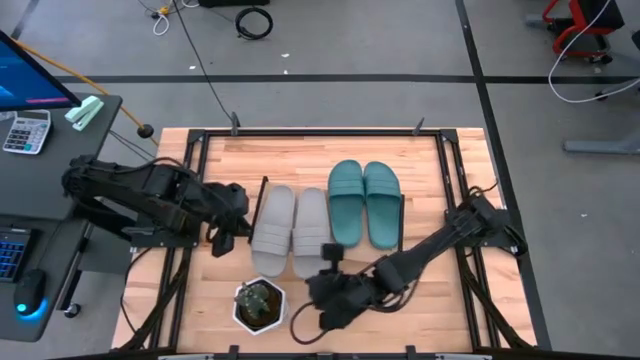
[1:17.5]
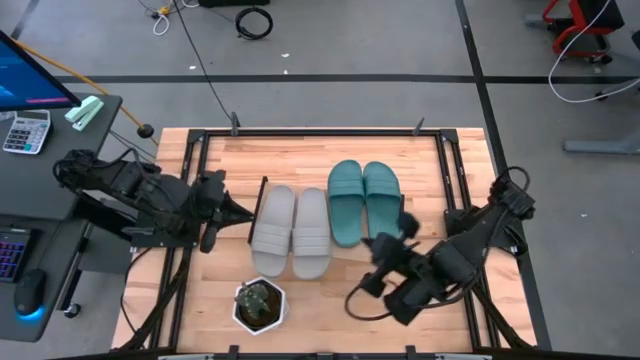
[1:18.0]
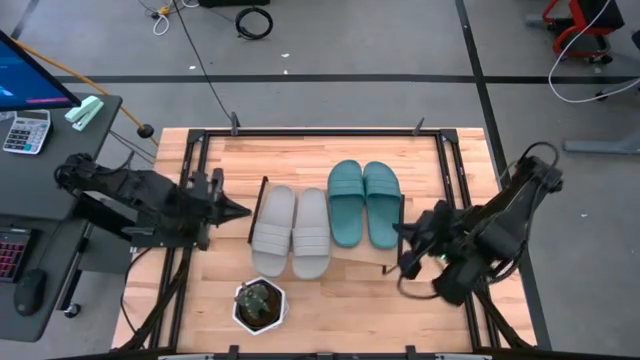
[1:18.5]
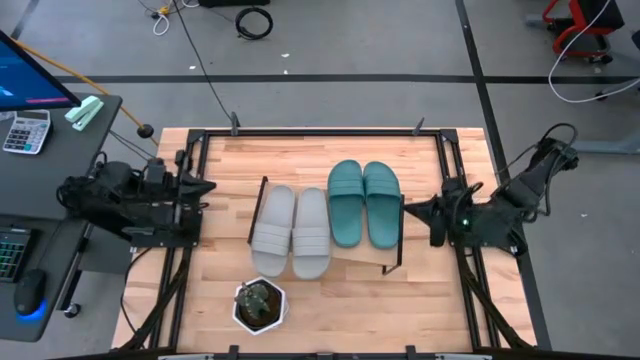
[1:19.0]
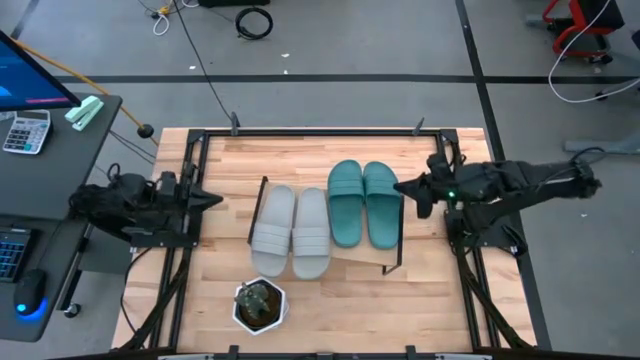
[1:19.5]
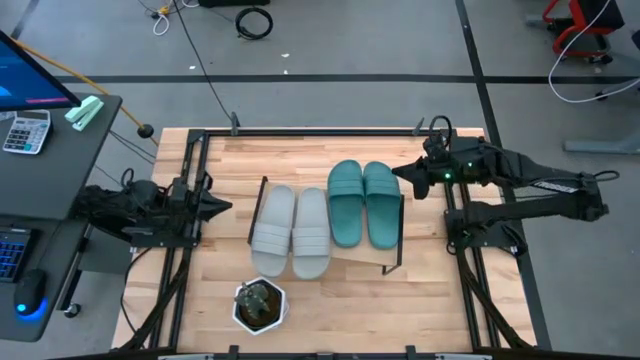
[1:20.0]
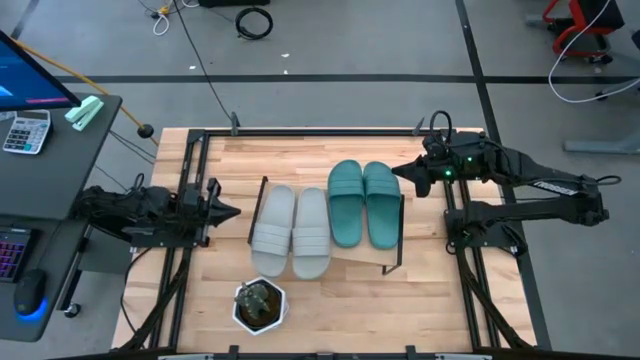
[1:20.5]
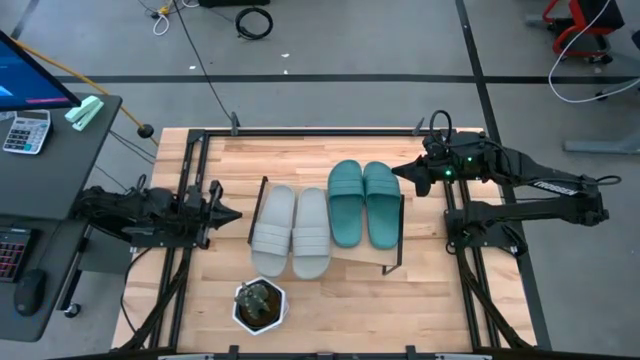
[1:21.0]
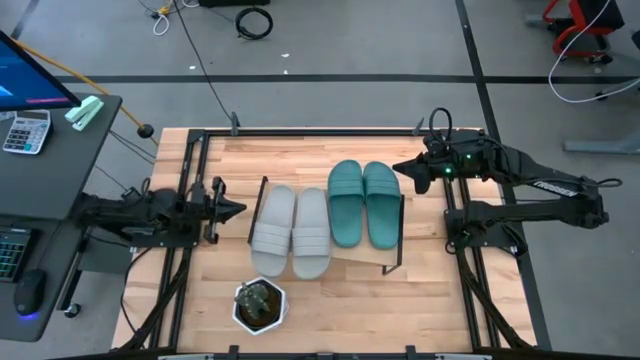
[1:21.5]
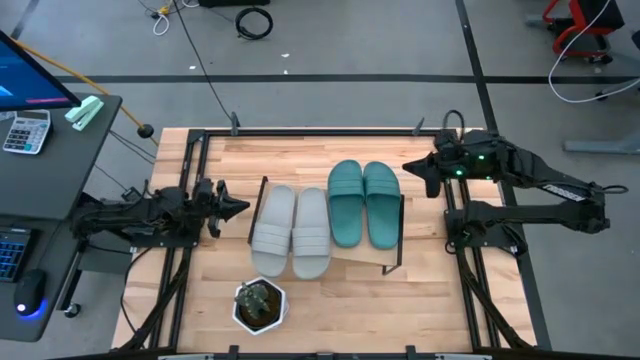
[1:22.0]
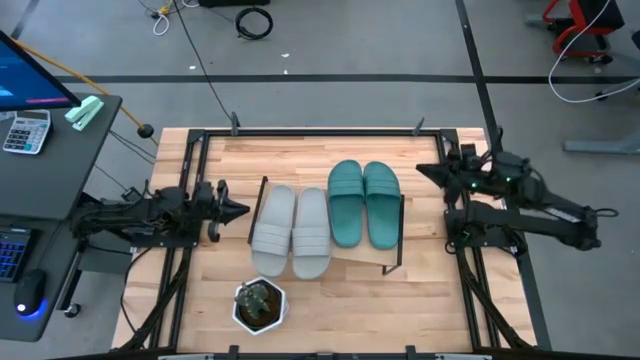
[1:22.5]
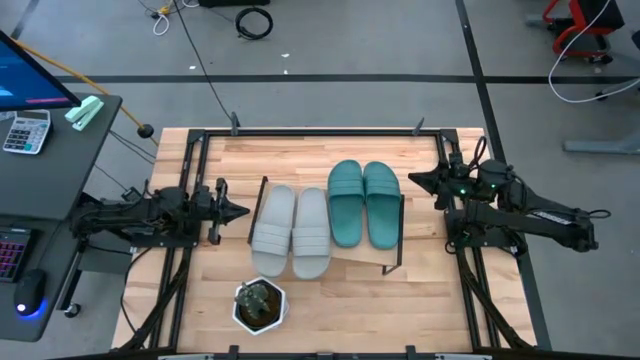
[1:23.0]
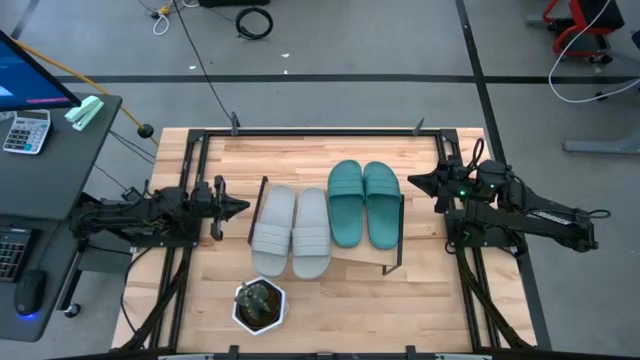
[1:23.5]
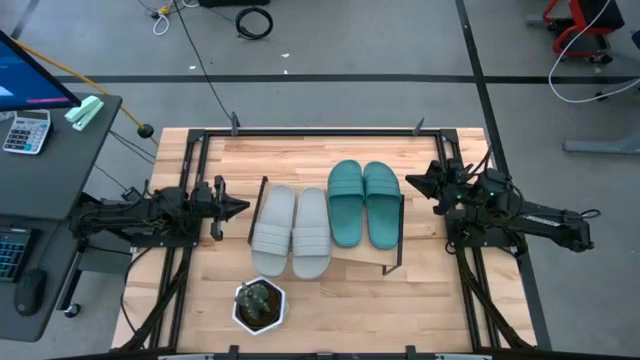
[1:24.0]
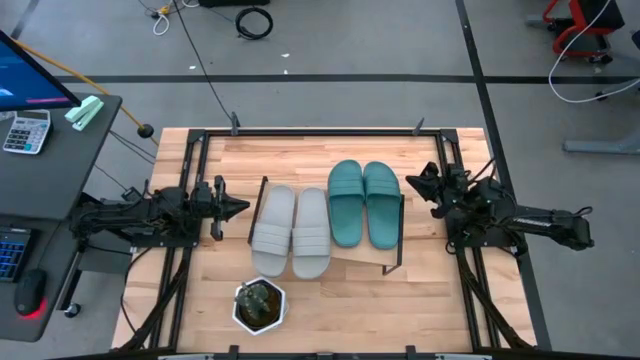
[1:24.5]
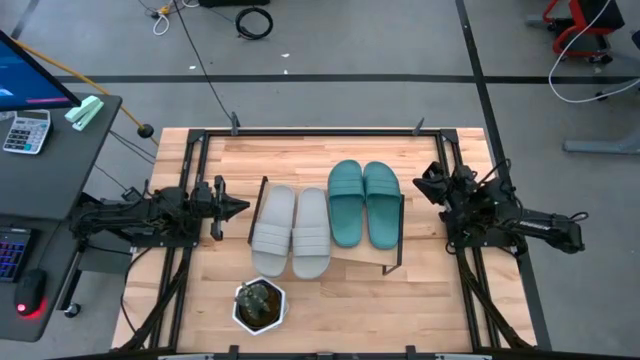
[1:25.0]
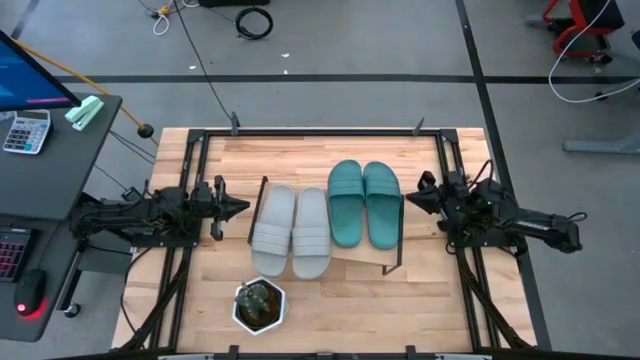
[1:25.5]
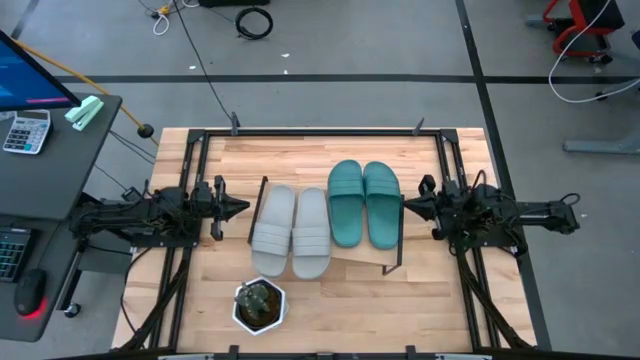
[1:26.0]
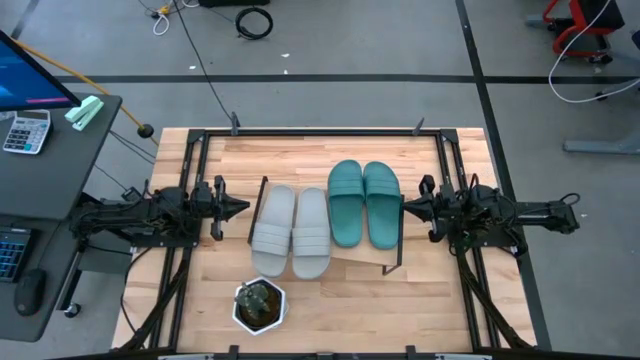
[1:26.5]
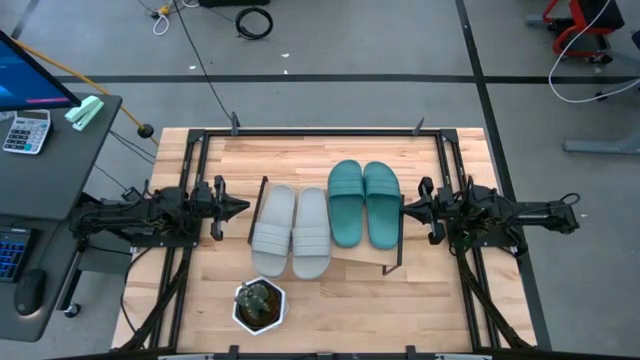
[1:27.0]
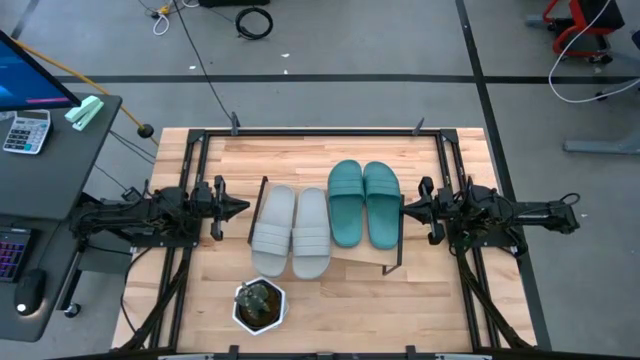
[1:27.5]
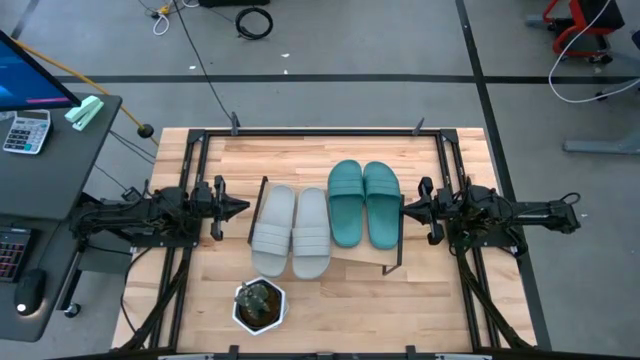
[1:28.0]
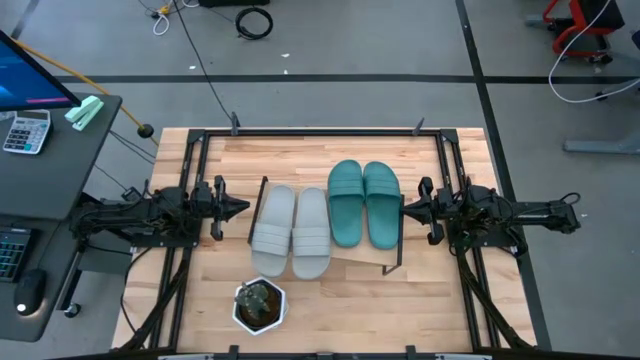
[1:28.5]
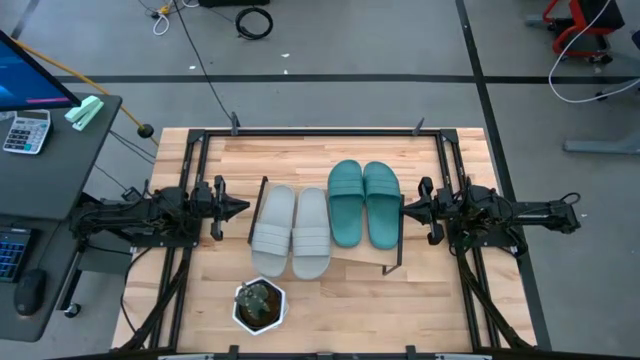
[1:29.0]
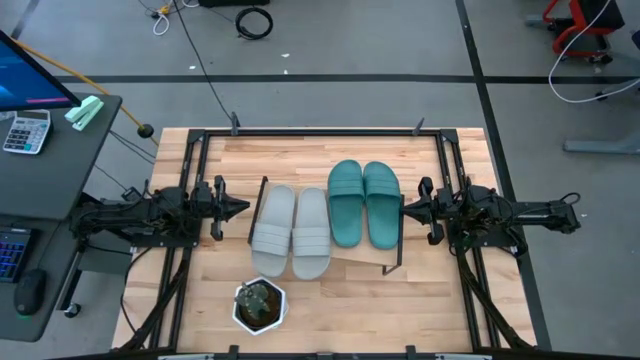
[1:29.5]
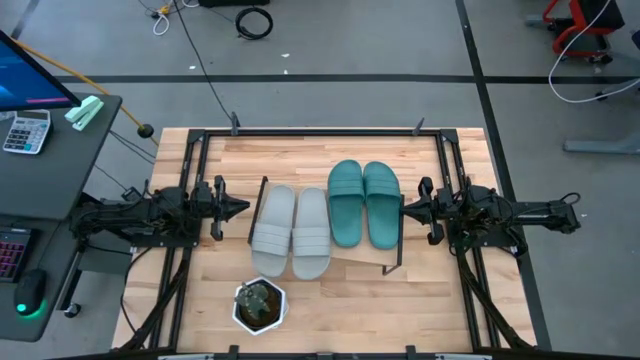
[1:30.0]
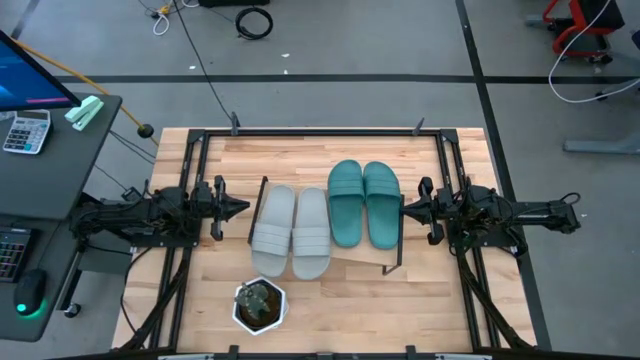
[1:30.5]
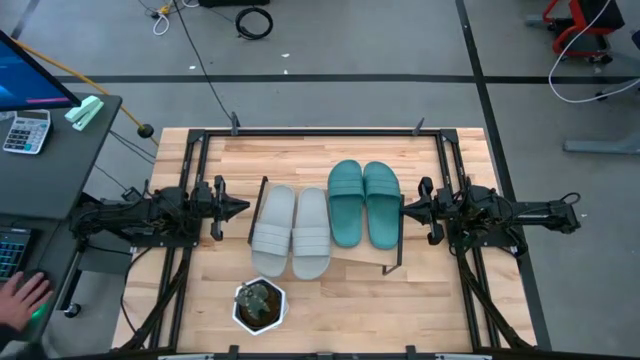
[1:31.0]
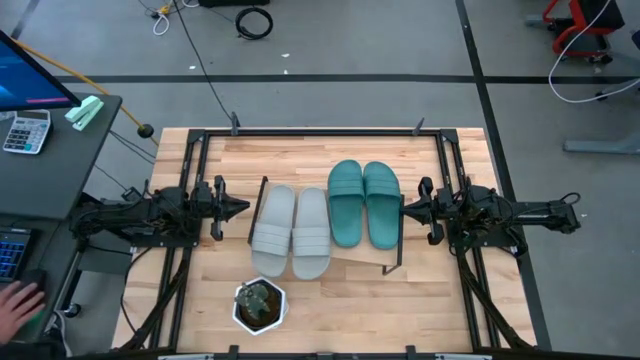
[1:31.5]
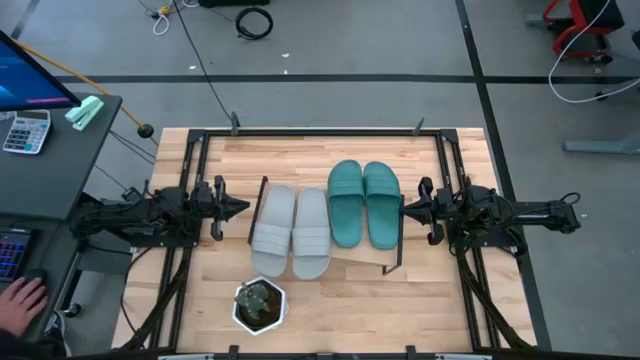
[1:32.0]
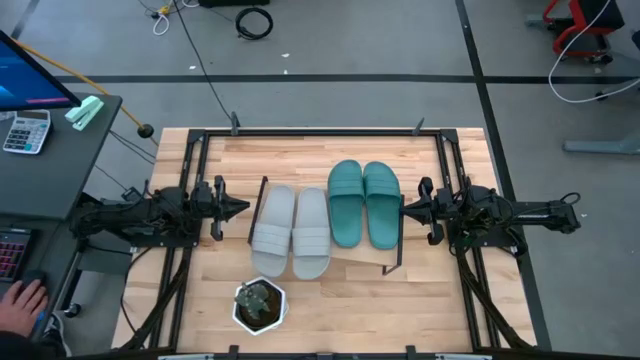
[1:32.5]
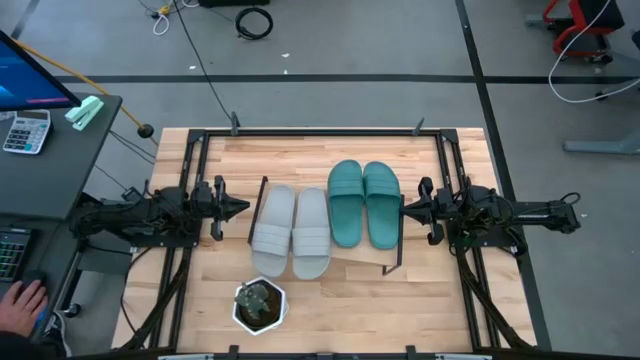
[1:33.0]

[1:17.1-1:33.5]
Task: Pick and place slides into the shelf
Return to Home Position

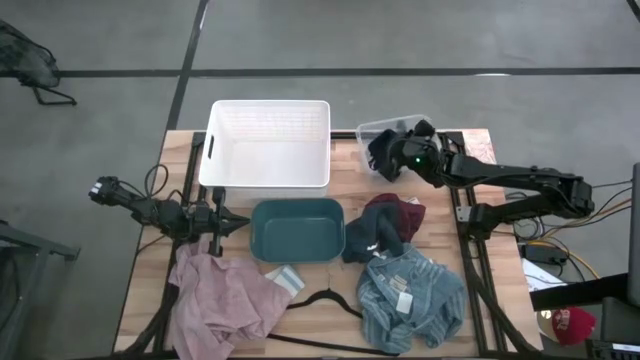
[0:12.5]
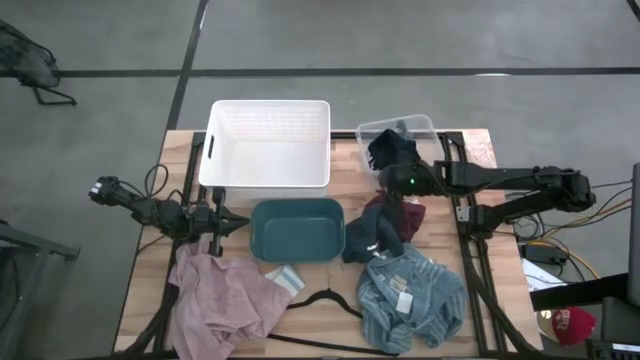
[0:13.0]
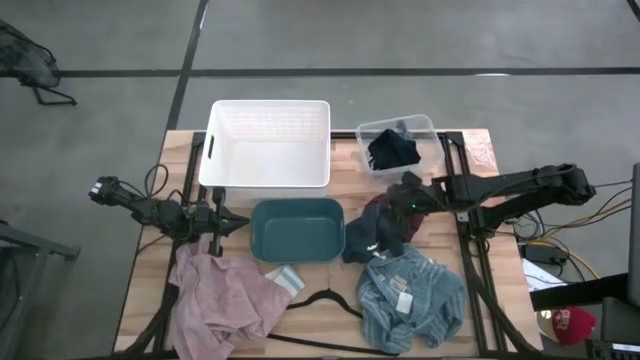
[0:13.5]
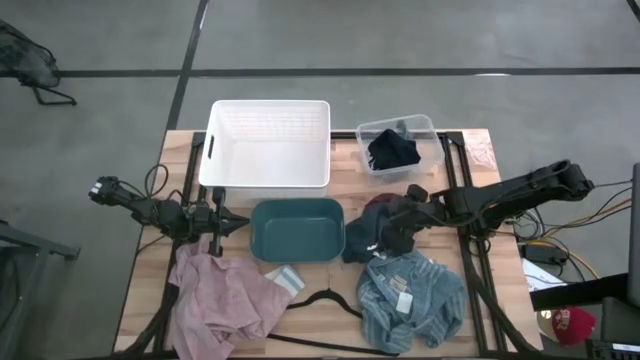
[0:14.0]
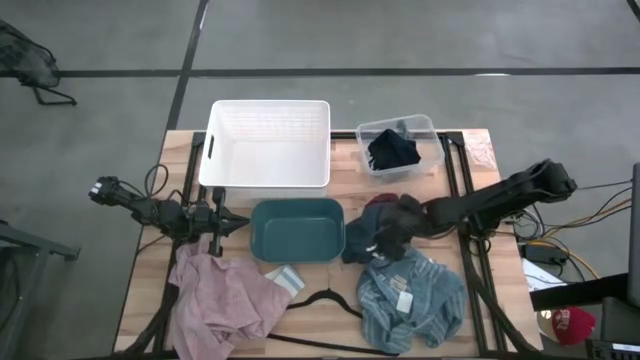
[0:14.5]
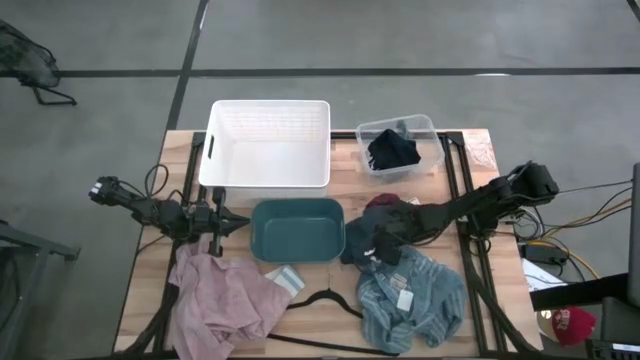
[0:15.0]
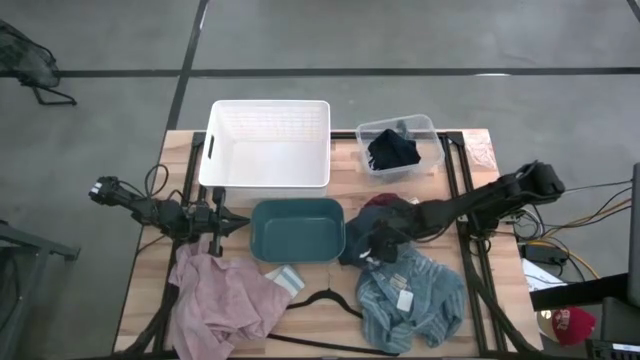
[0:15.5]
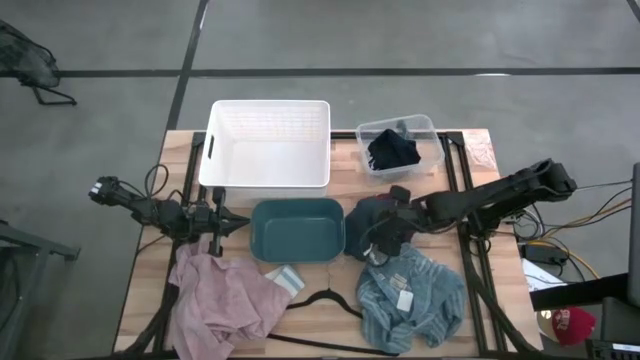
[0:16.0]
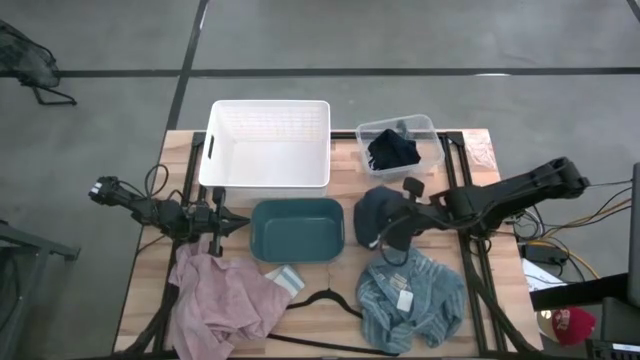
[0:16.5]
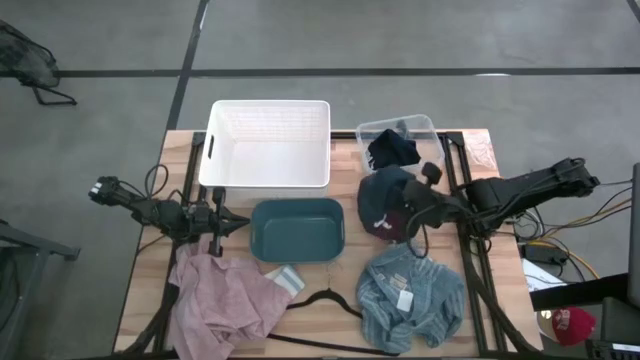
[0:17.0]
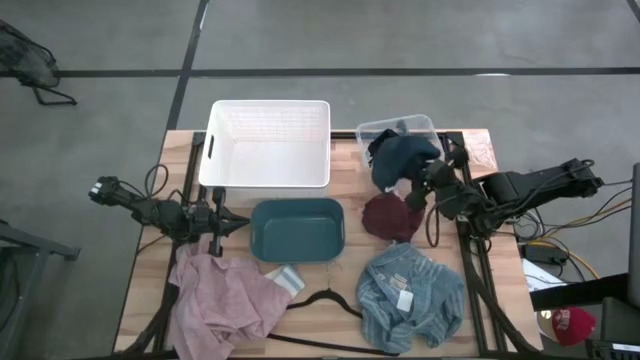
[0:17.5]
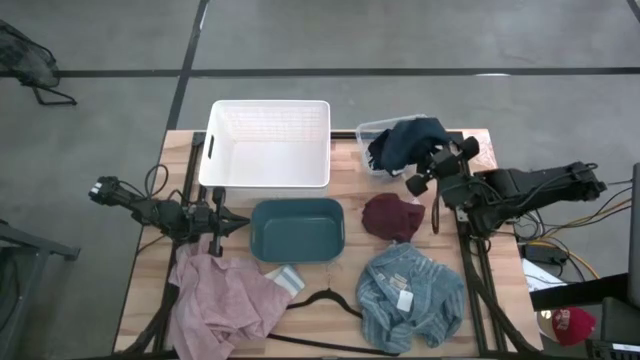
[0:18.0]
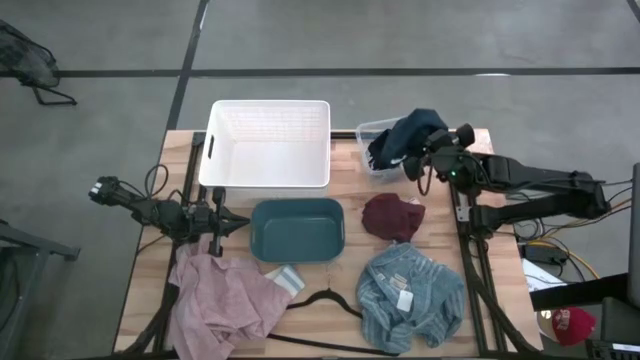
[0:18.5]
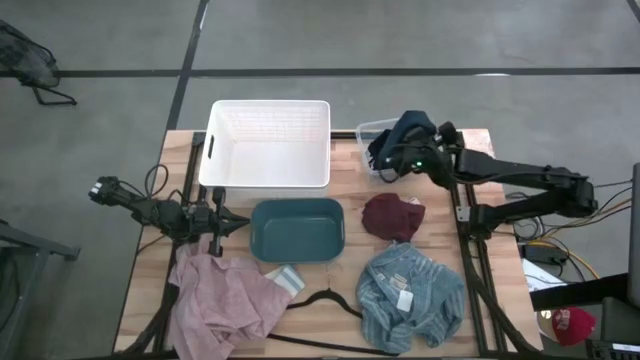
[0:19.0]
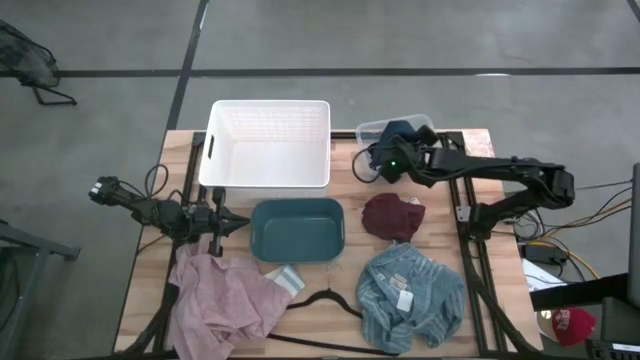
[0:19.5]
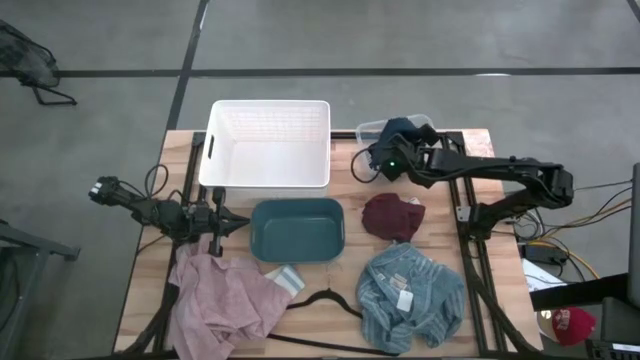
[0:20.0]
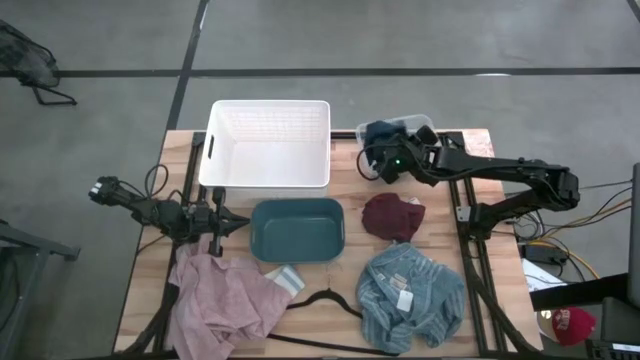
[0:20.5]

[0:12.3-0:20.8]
Task: Pick & Place Cloths
Put the blue shorts into the transparent bin
